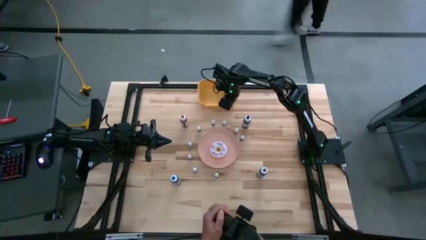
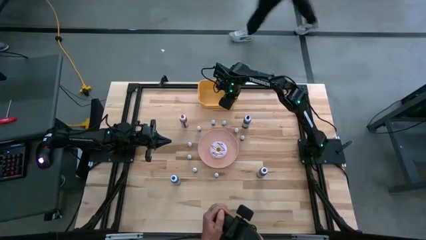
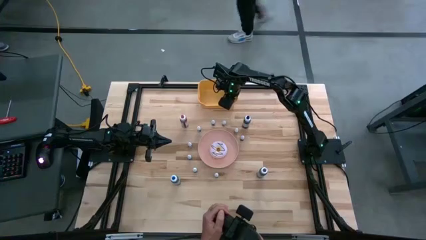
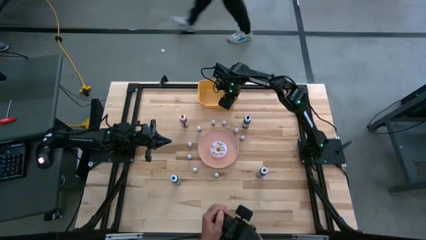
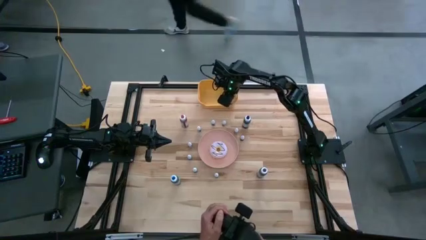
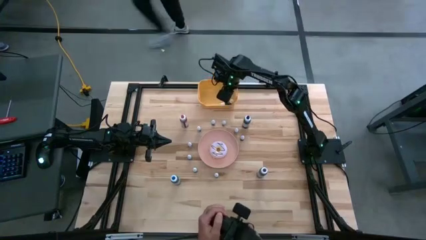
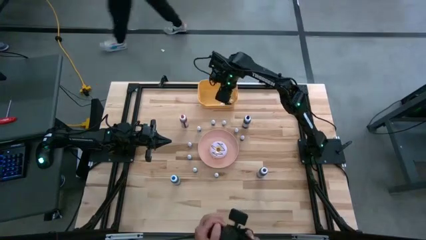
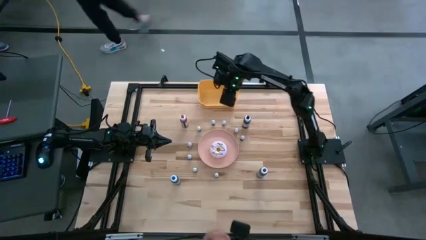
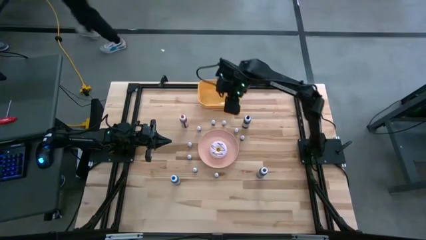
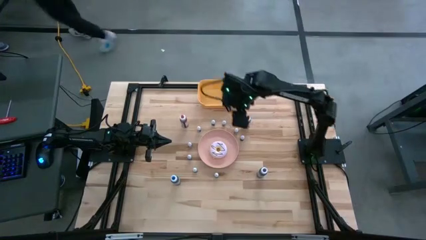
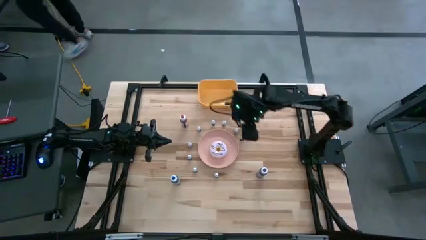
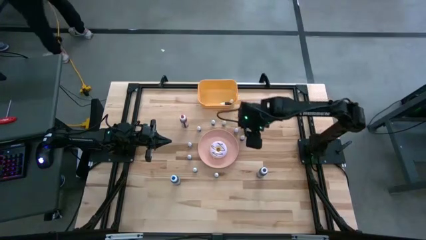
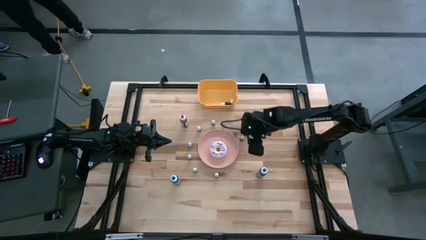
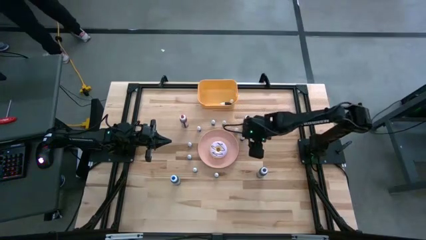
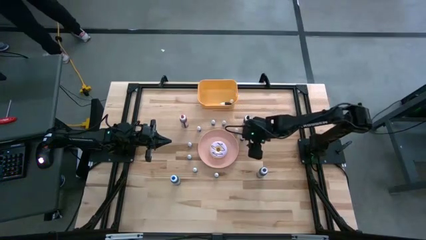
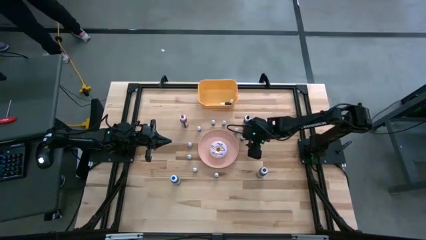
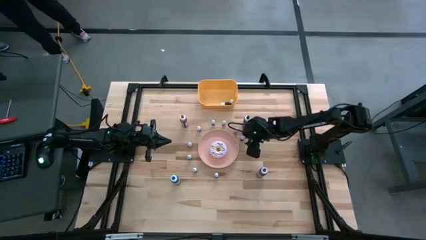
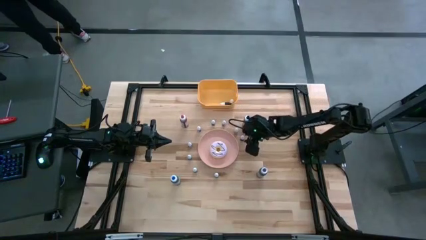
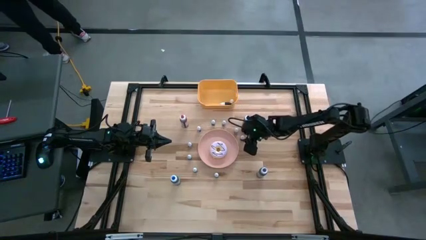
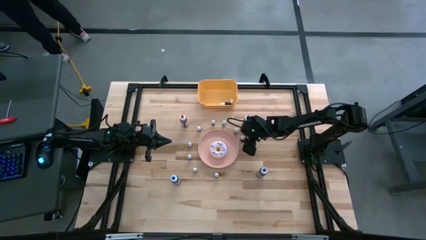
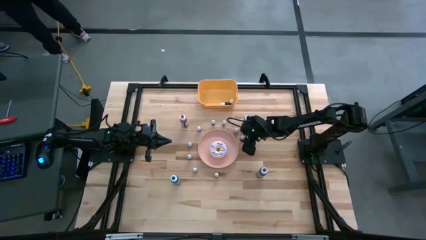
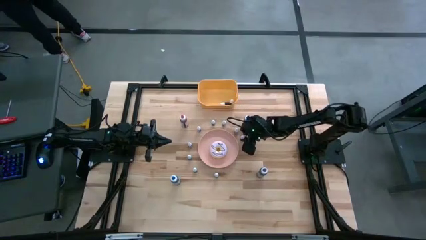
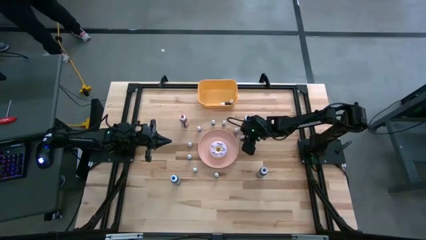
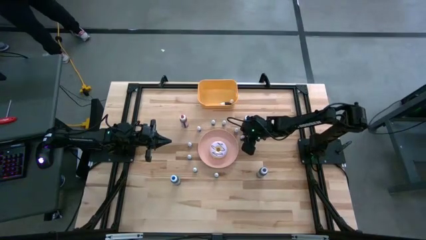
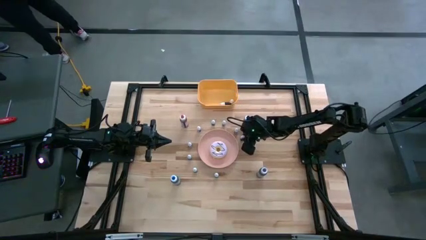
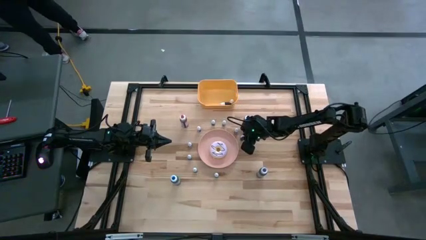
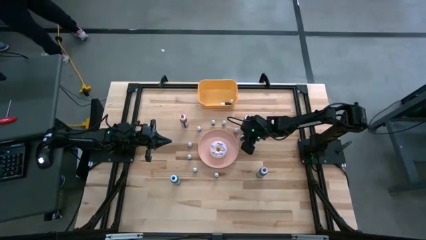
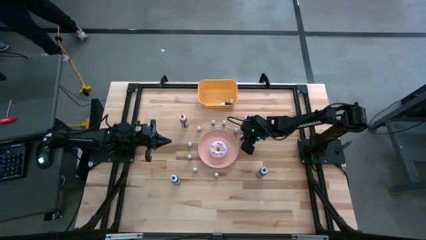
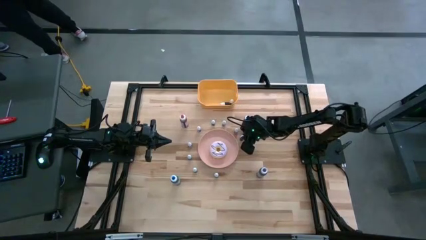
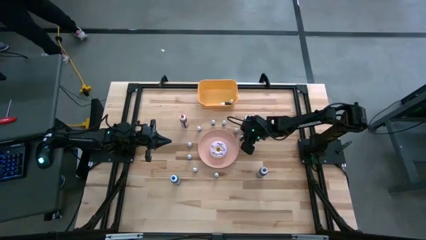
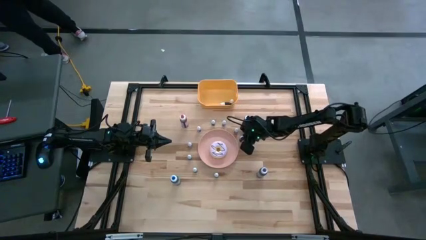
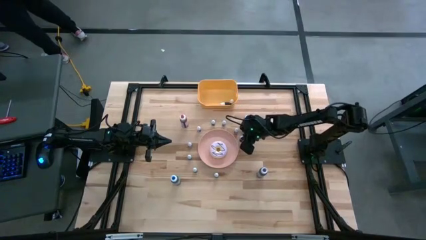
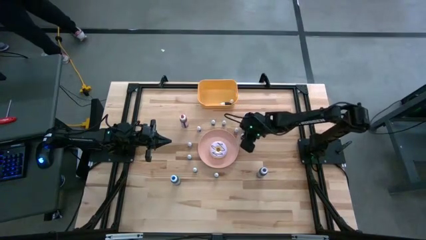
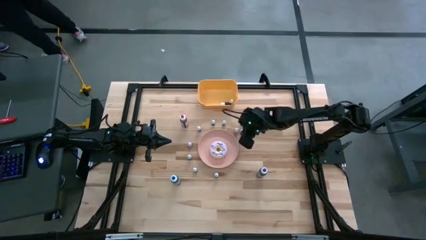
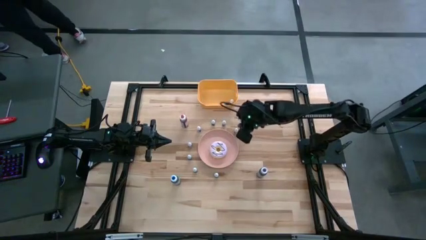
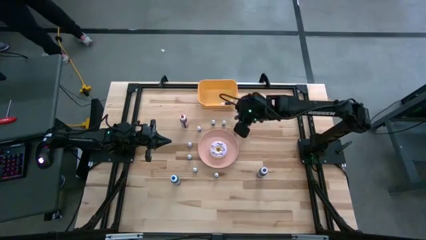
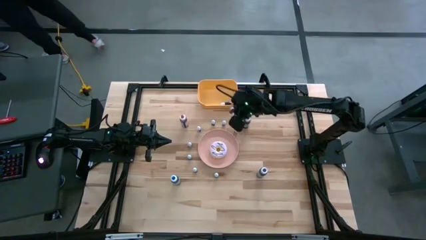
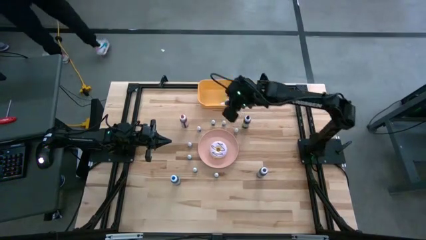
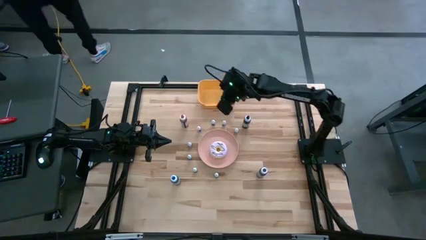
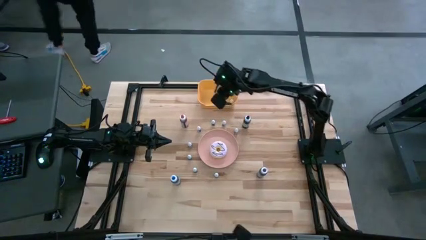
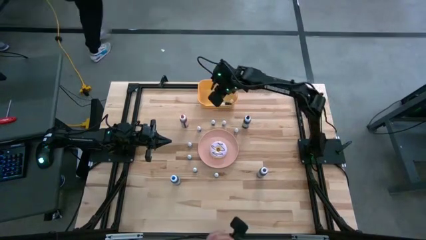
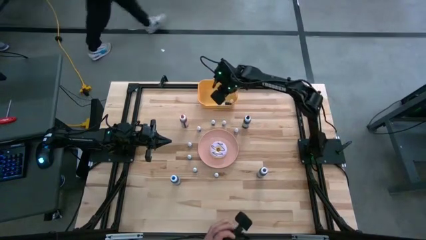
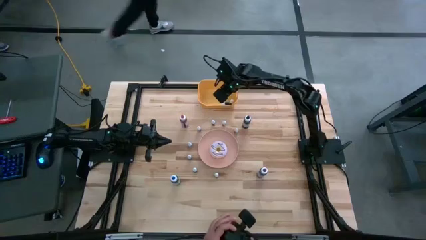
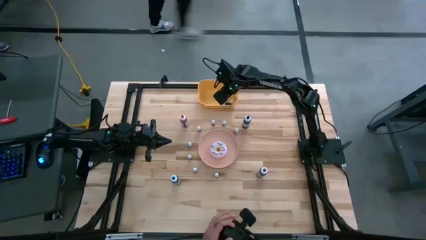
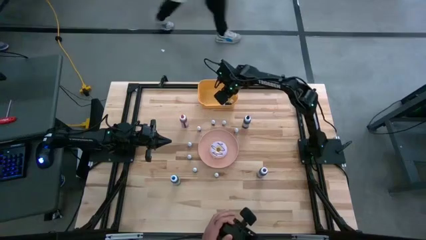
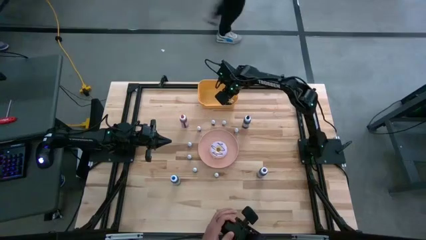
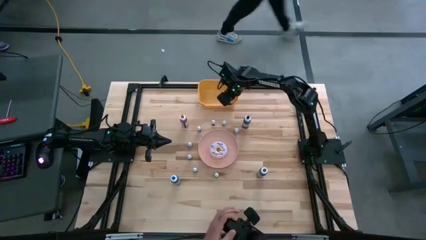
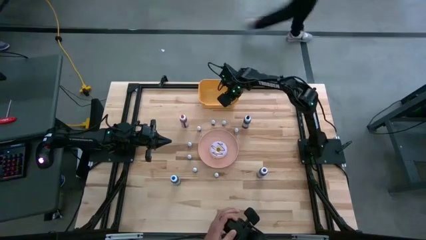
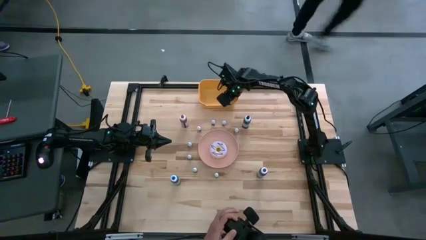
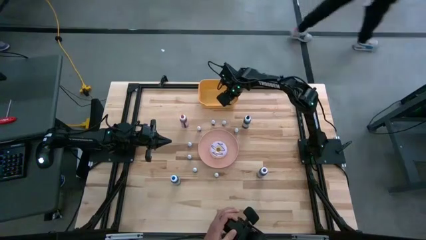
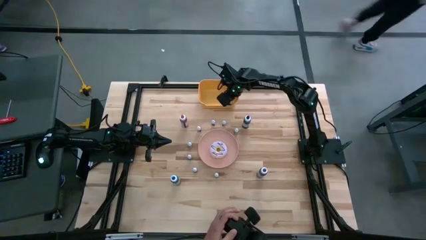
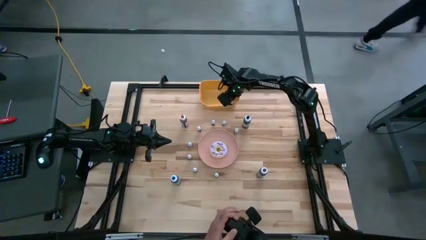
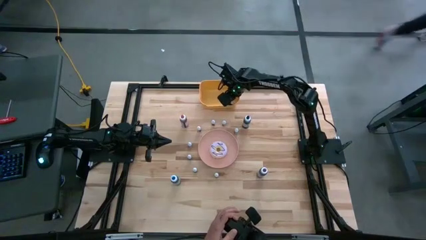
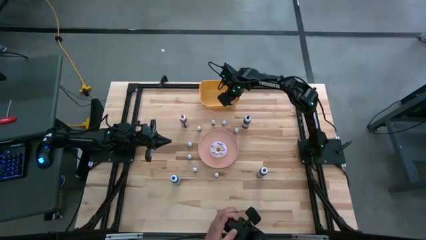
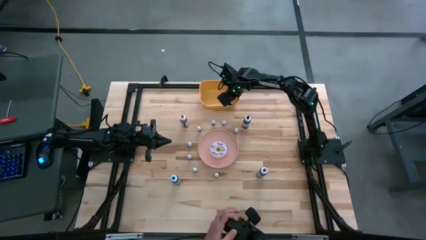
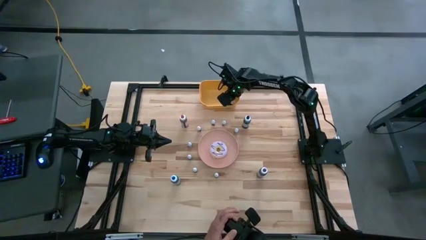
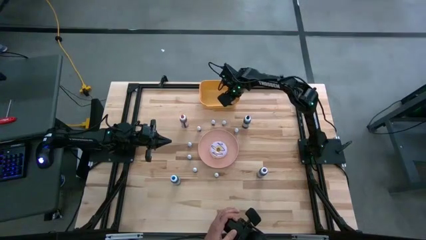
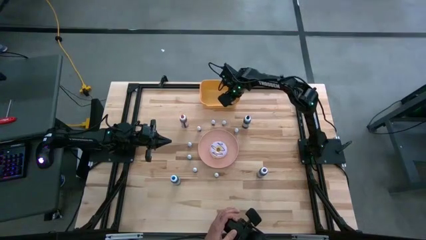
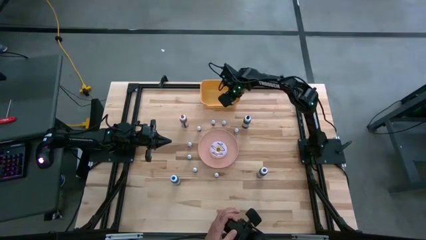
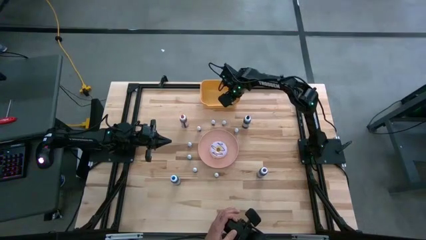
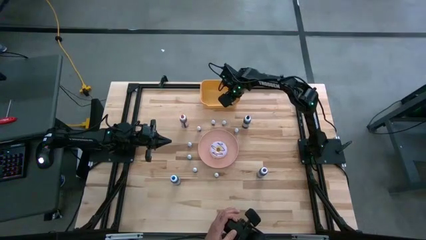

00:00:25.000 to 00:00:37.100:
Task: Pick & Place food coloring
Put the small black food coloring bottle into the orange bin

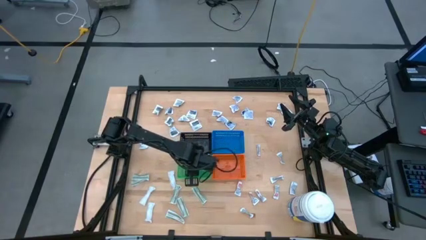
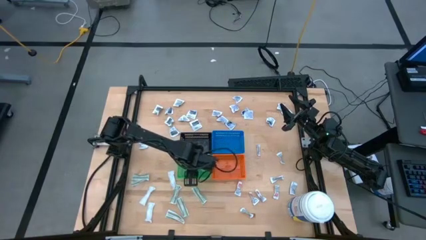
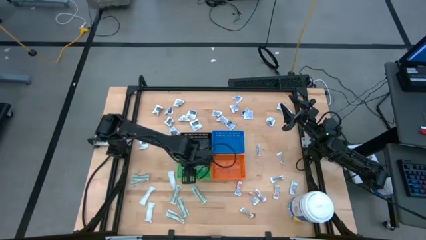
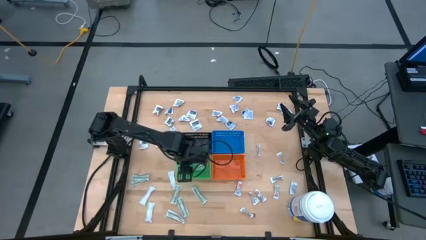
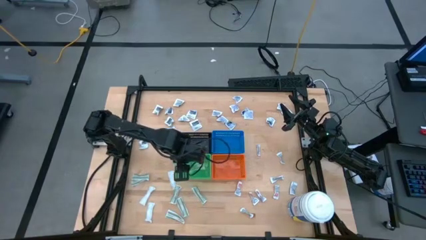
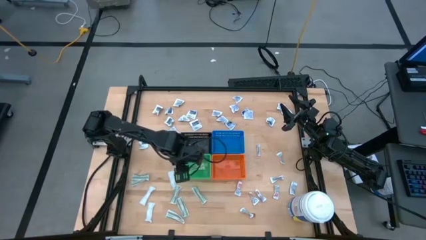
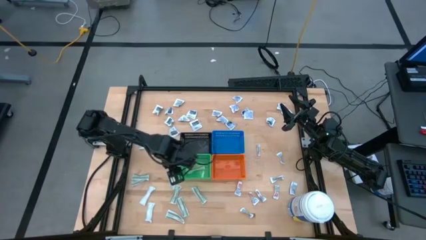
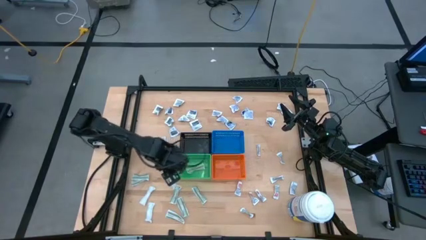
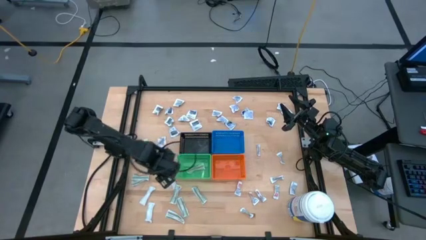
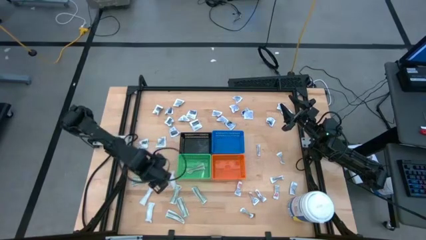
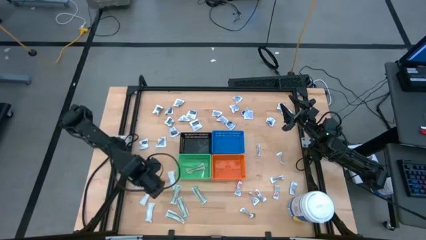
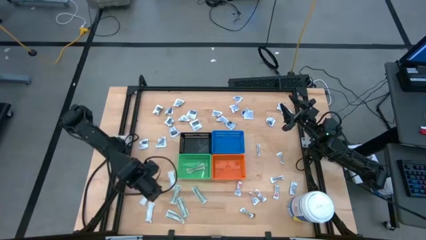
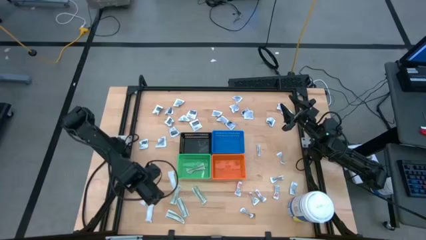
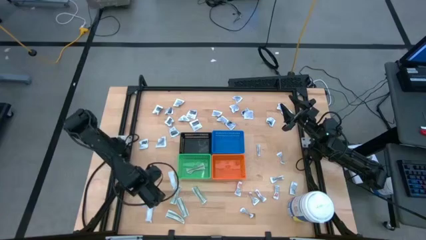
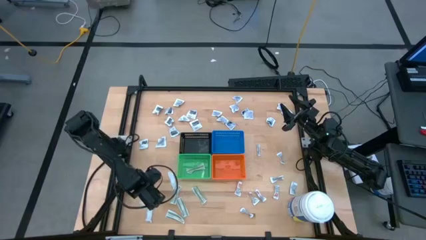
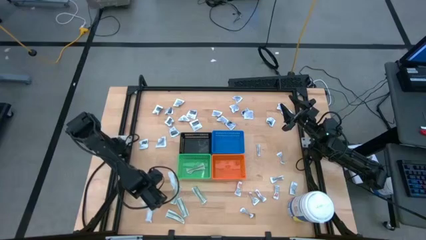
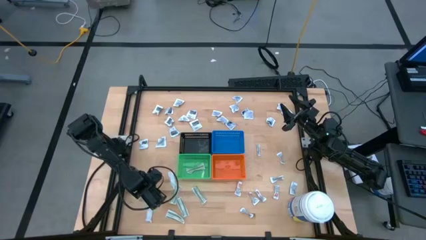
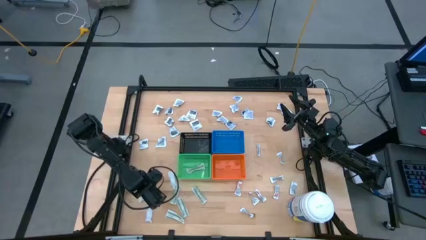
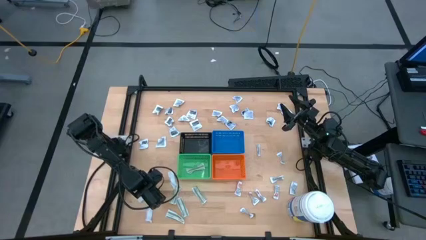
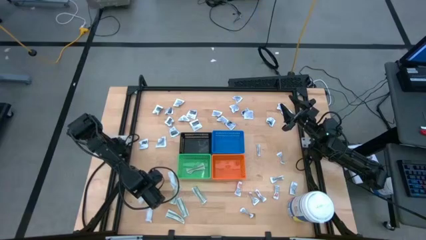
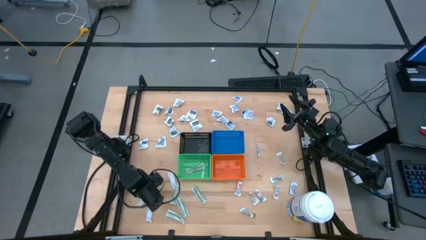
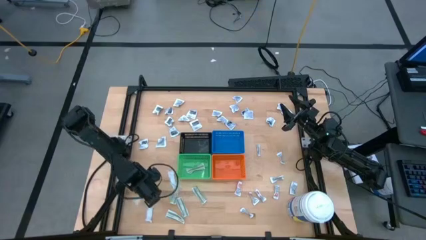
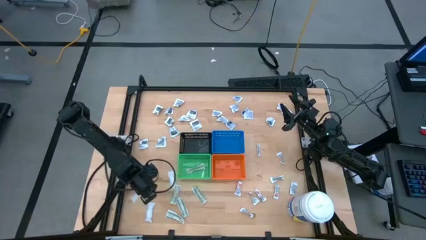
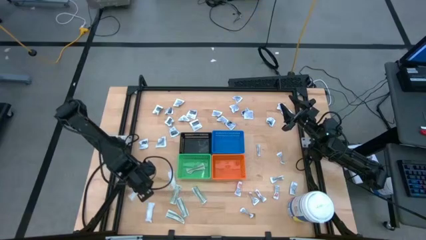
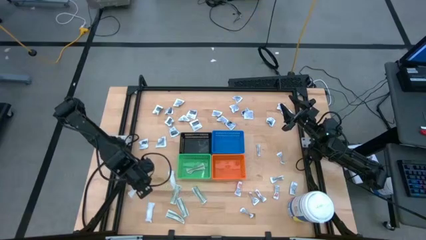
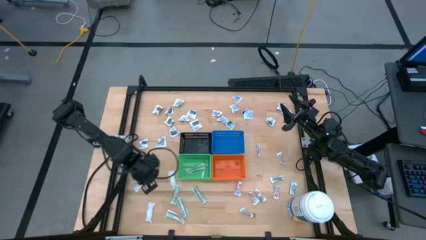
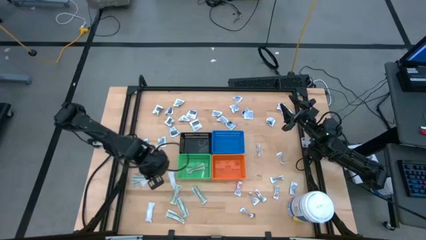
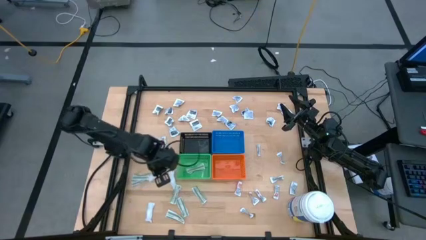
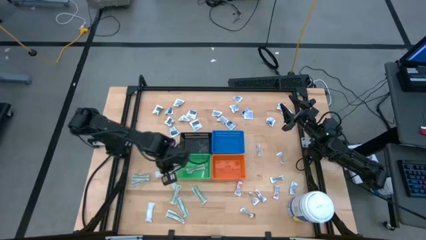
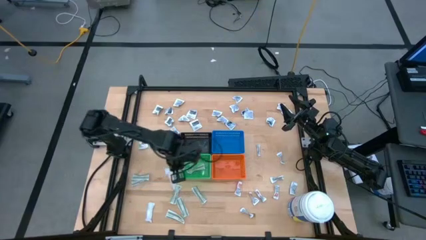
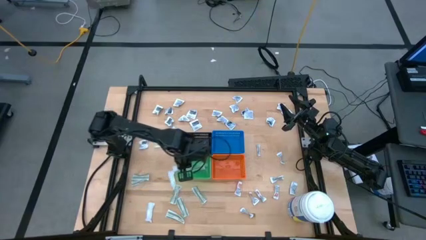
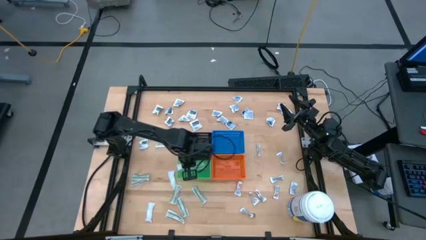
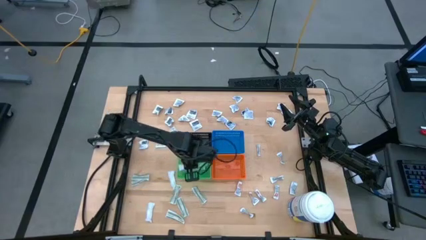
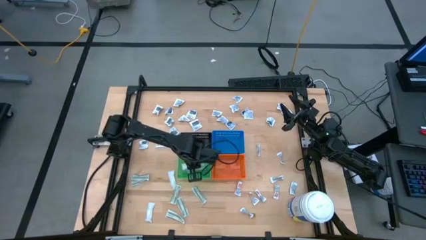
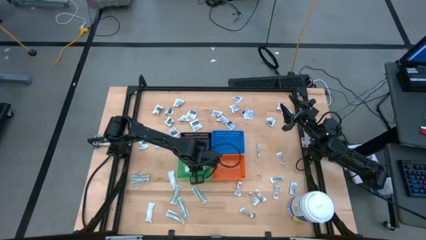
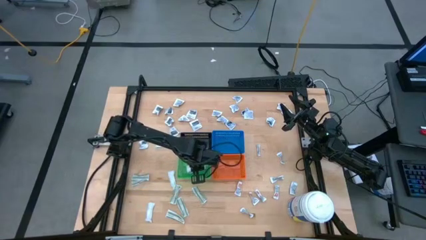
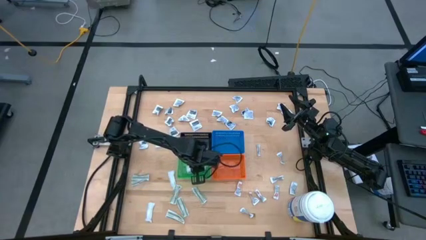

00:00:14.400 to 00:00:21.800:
Task: Pick & Place First Aid Supplies
Put the bandage into the green bin
